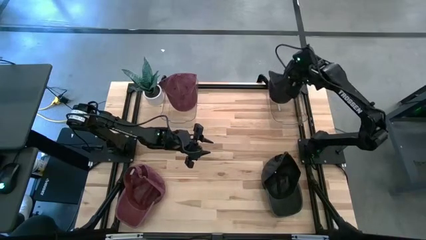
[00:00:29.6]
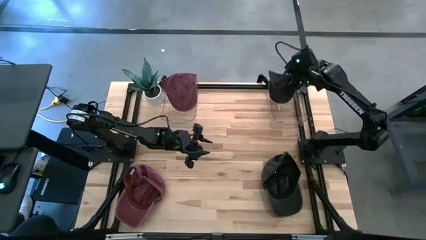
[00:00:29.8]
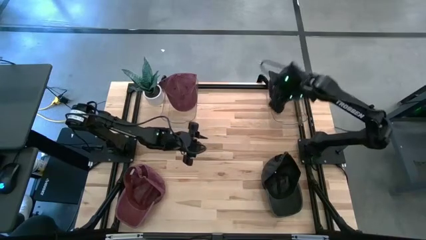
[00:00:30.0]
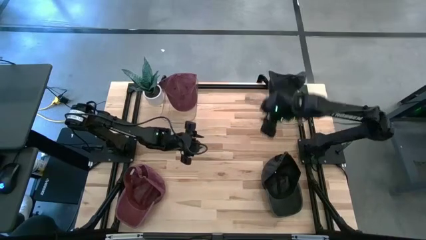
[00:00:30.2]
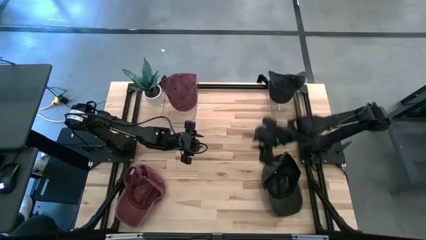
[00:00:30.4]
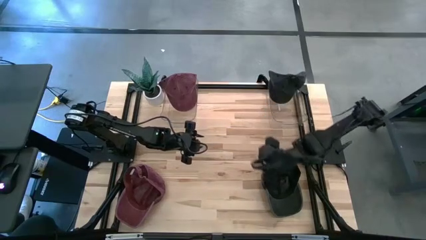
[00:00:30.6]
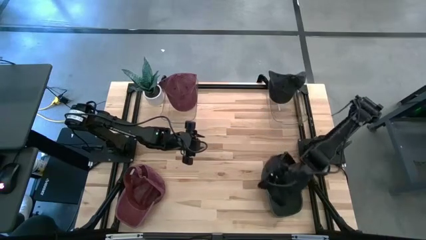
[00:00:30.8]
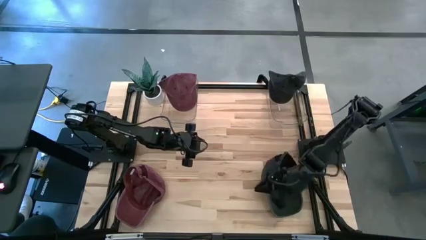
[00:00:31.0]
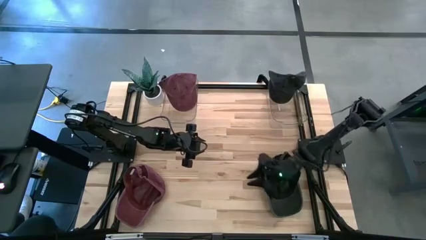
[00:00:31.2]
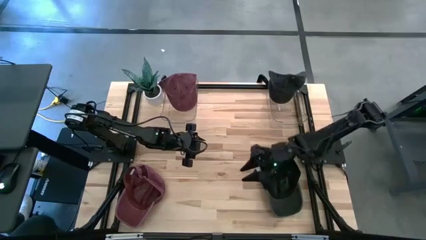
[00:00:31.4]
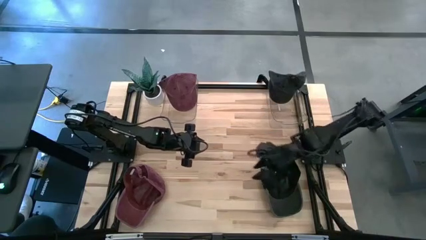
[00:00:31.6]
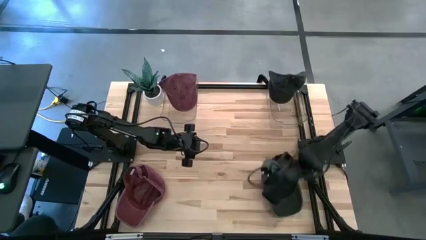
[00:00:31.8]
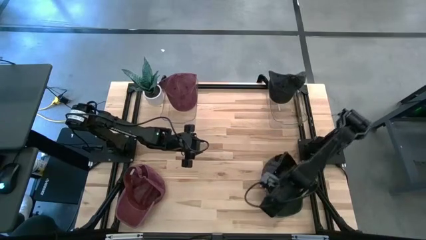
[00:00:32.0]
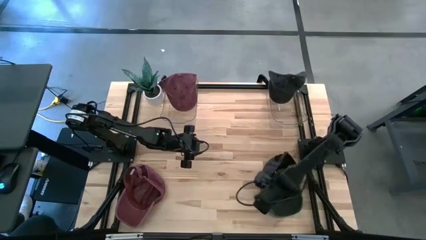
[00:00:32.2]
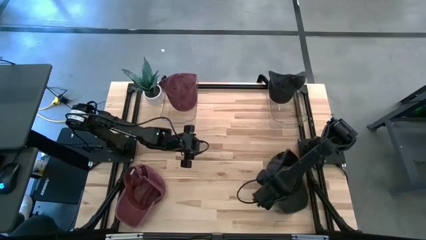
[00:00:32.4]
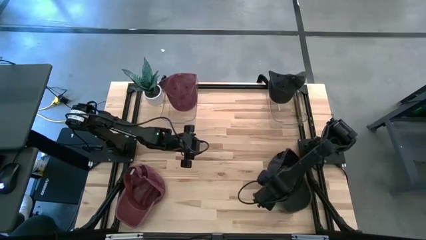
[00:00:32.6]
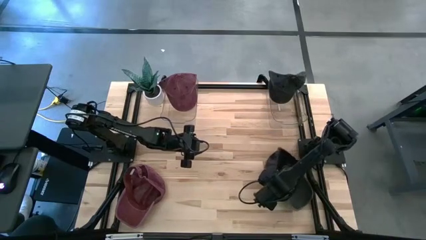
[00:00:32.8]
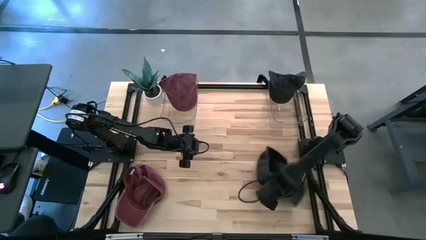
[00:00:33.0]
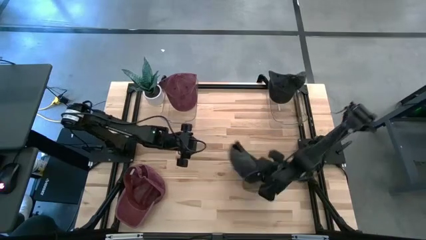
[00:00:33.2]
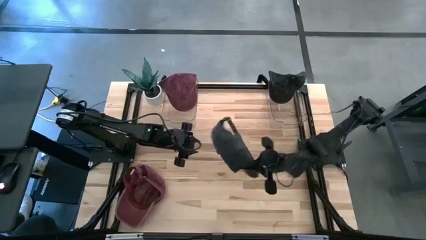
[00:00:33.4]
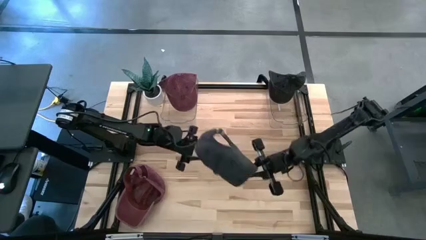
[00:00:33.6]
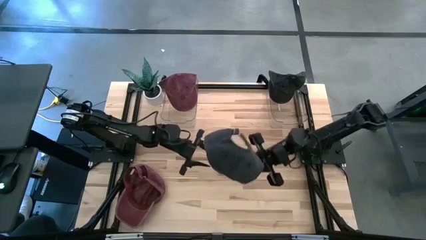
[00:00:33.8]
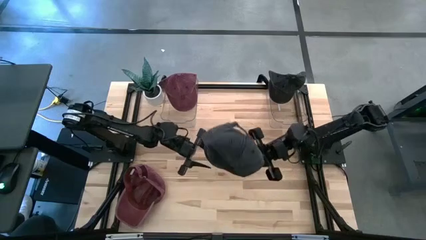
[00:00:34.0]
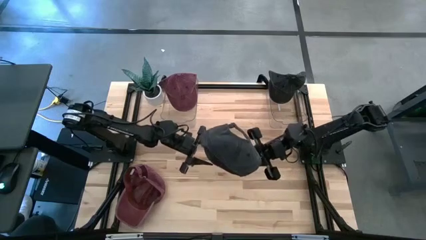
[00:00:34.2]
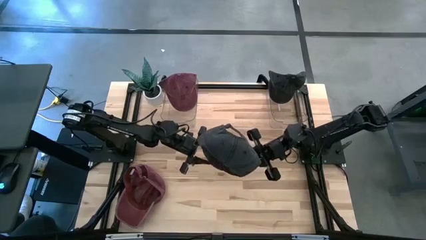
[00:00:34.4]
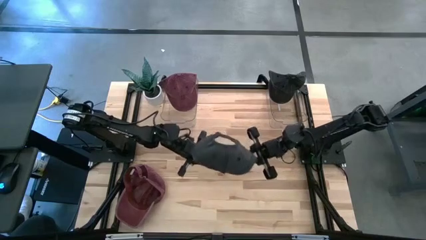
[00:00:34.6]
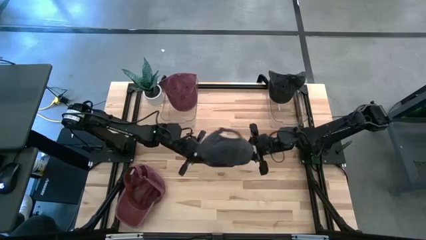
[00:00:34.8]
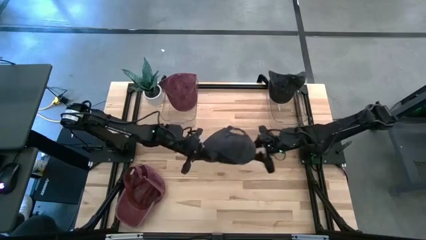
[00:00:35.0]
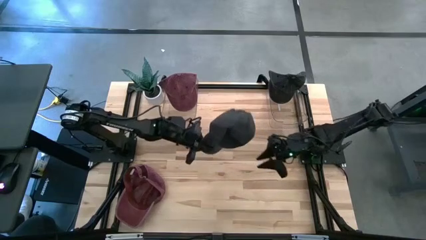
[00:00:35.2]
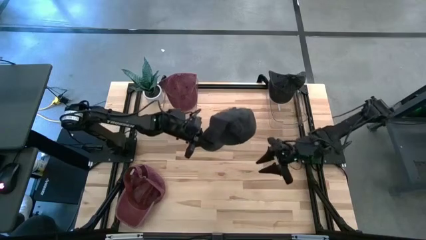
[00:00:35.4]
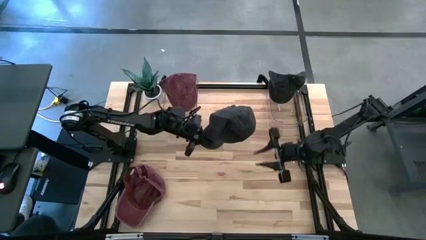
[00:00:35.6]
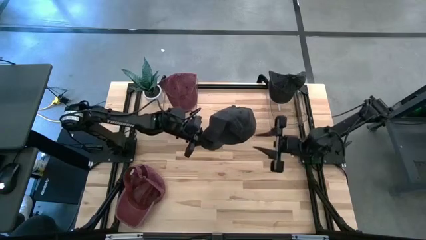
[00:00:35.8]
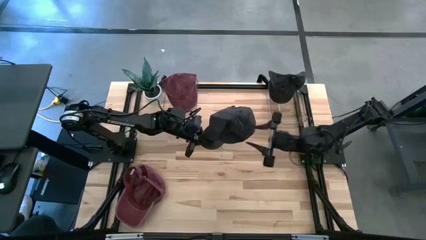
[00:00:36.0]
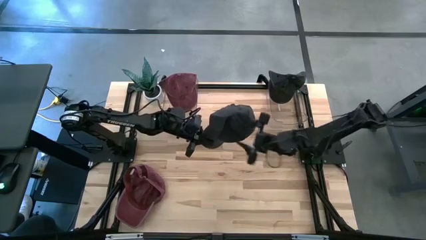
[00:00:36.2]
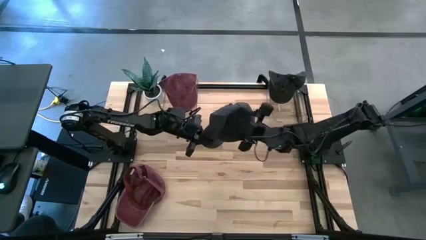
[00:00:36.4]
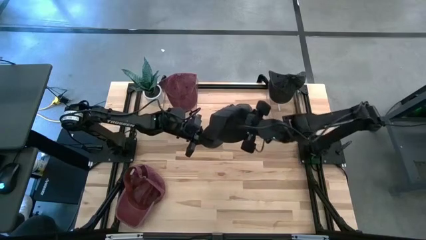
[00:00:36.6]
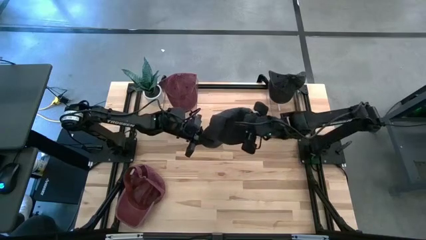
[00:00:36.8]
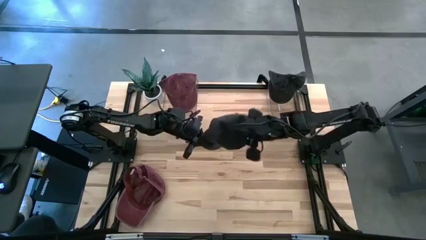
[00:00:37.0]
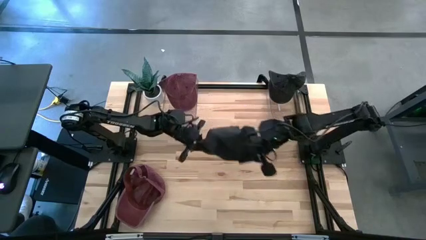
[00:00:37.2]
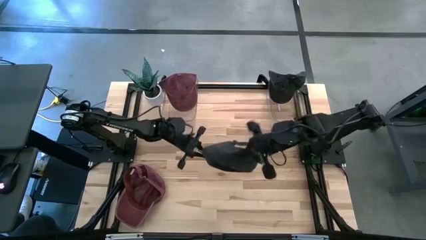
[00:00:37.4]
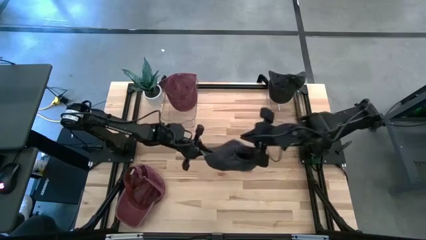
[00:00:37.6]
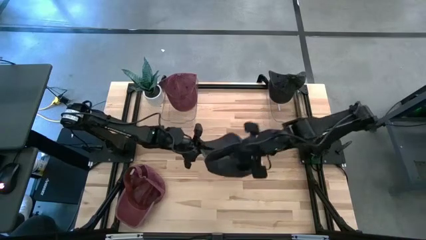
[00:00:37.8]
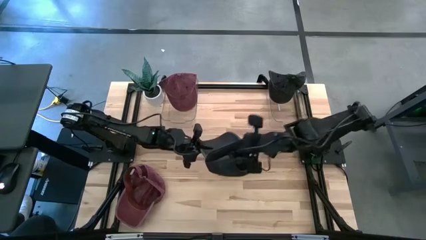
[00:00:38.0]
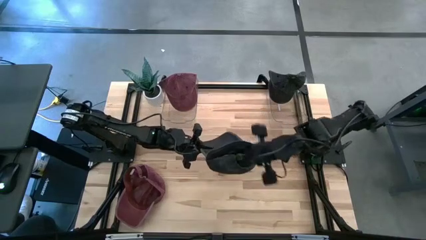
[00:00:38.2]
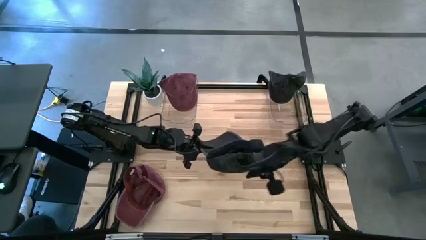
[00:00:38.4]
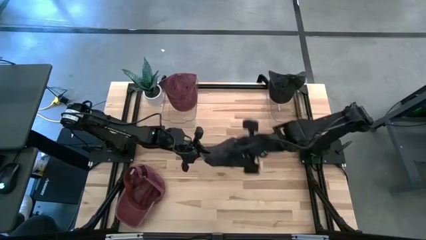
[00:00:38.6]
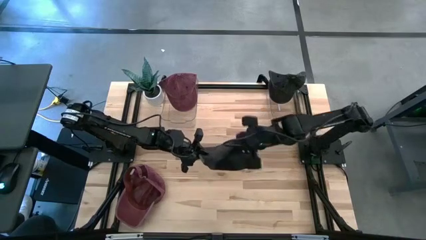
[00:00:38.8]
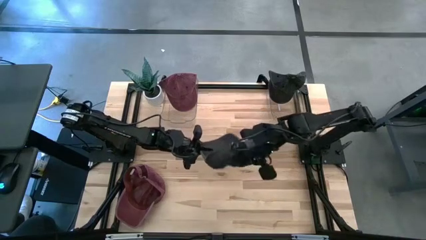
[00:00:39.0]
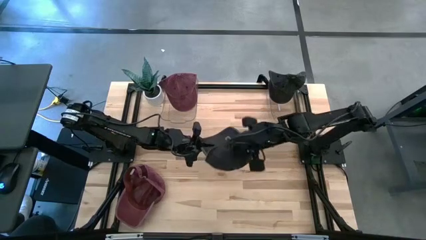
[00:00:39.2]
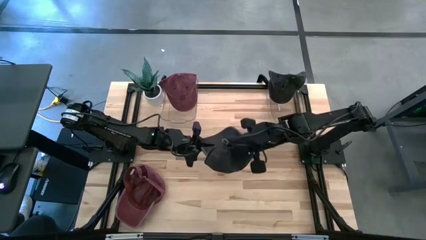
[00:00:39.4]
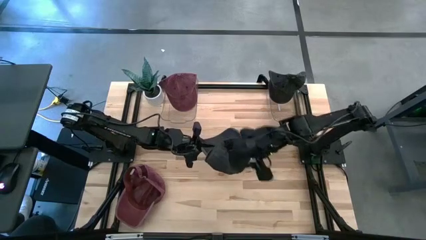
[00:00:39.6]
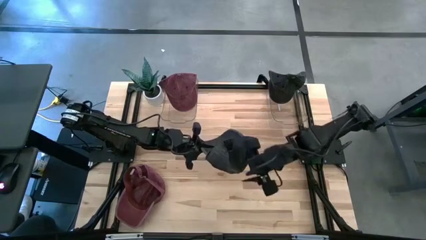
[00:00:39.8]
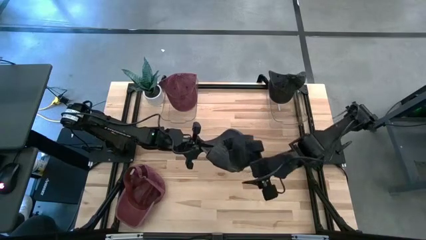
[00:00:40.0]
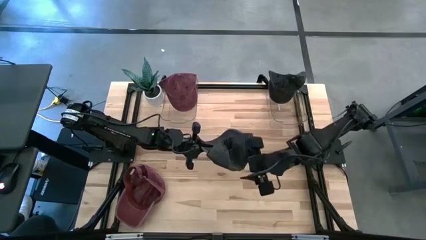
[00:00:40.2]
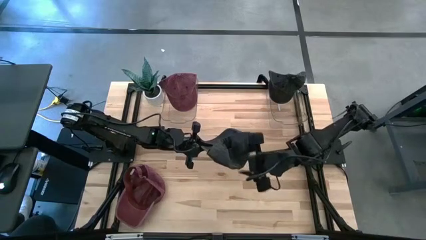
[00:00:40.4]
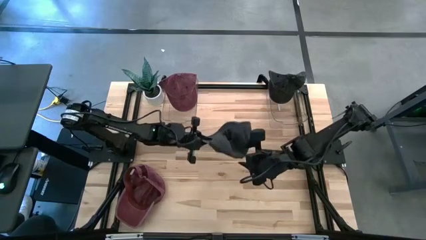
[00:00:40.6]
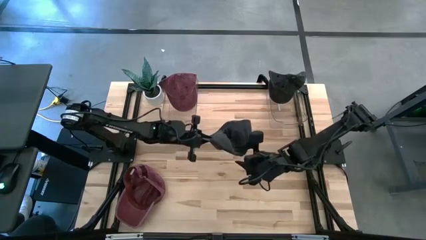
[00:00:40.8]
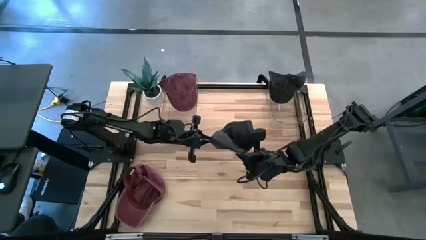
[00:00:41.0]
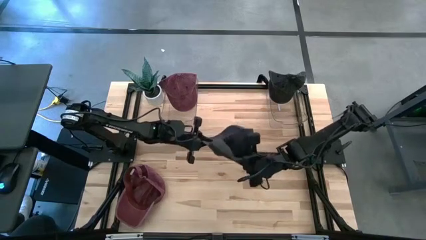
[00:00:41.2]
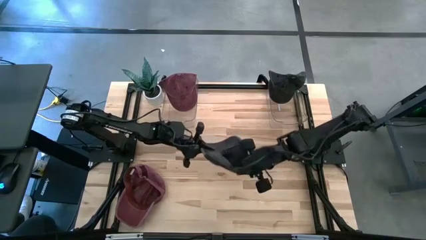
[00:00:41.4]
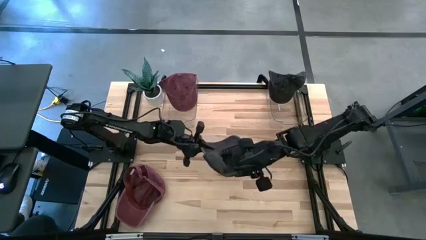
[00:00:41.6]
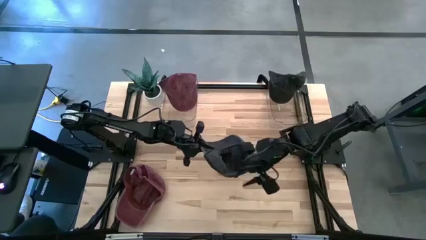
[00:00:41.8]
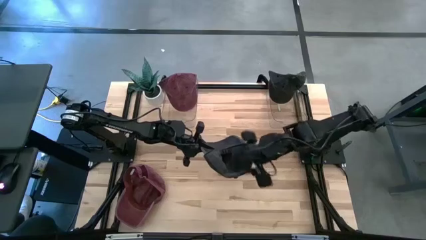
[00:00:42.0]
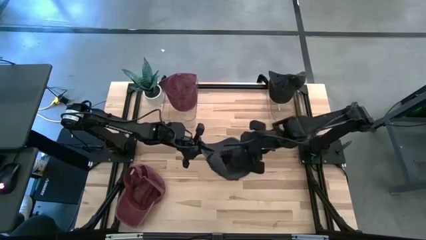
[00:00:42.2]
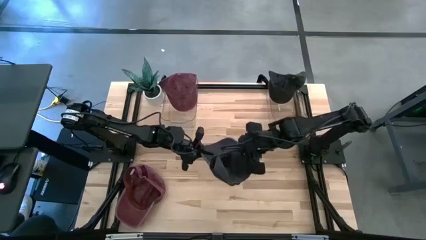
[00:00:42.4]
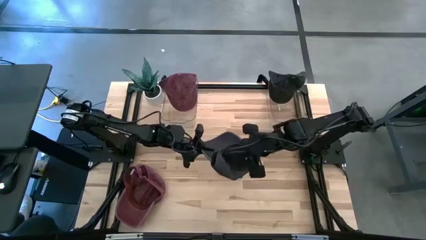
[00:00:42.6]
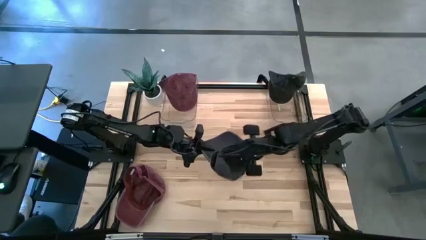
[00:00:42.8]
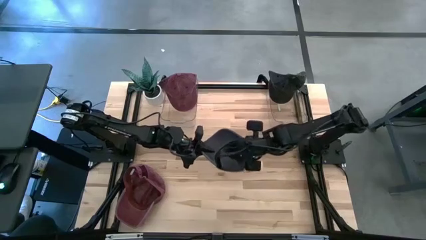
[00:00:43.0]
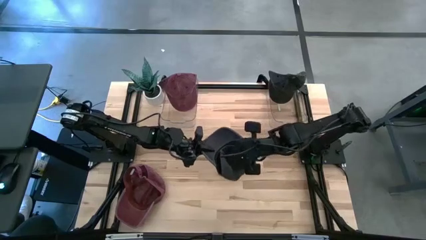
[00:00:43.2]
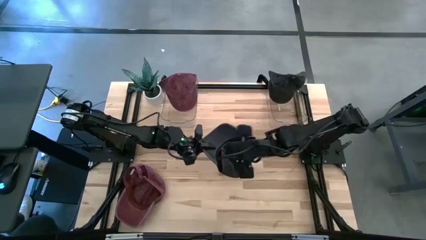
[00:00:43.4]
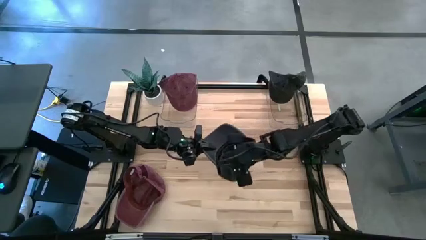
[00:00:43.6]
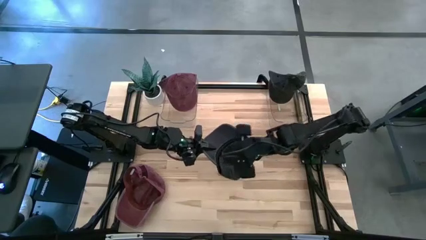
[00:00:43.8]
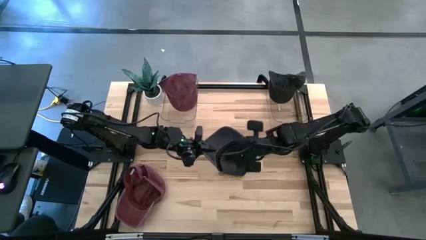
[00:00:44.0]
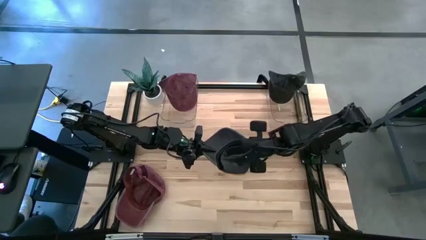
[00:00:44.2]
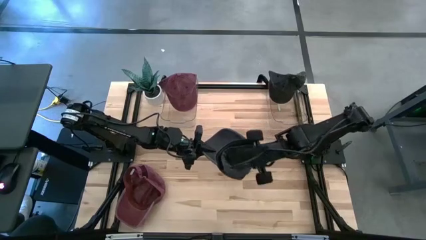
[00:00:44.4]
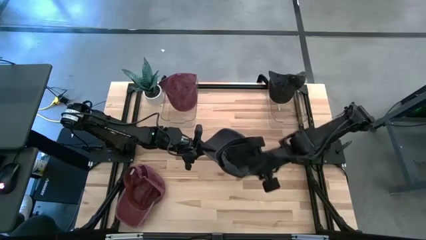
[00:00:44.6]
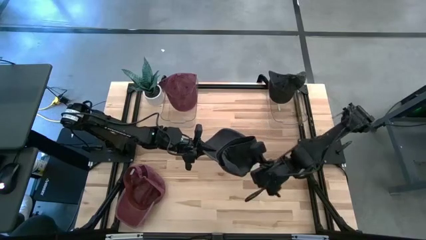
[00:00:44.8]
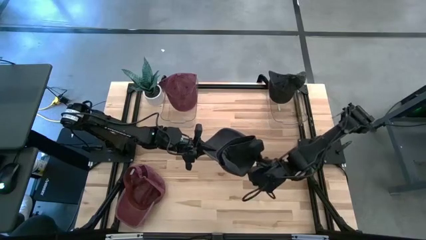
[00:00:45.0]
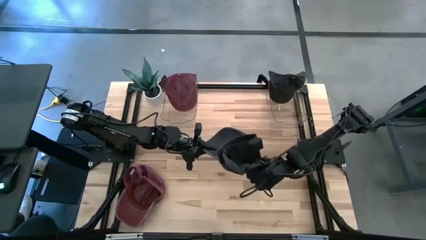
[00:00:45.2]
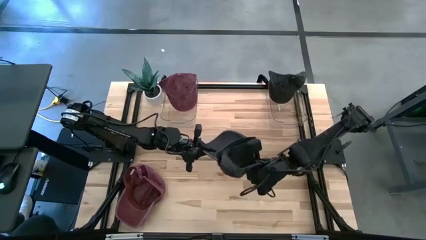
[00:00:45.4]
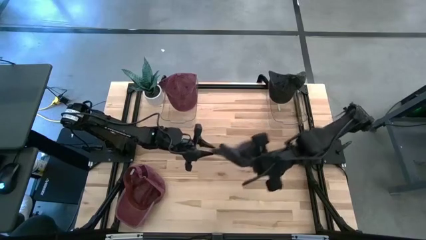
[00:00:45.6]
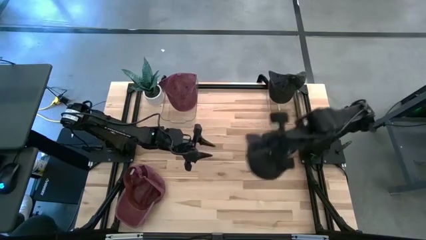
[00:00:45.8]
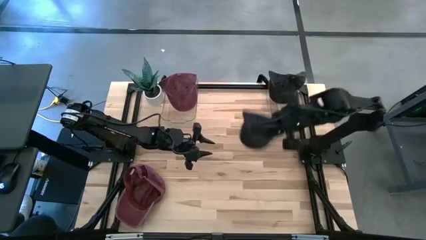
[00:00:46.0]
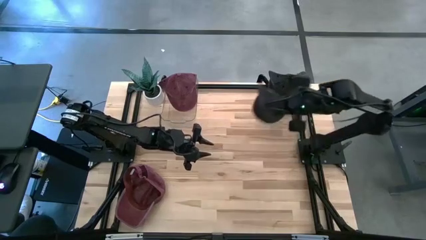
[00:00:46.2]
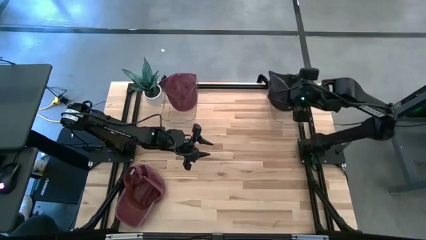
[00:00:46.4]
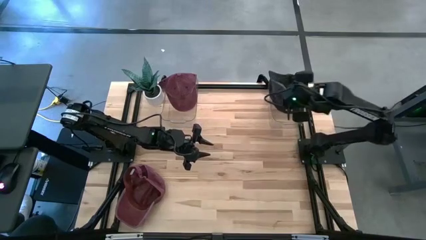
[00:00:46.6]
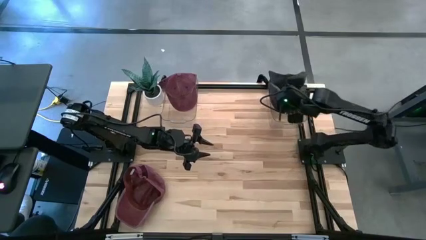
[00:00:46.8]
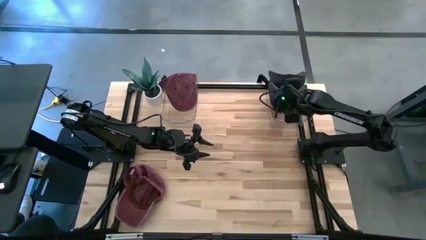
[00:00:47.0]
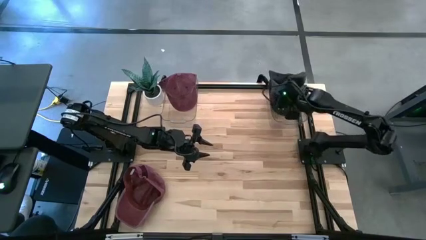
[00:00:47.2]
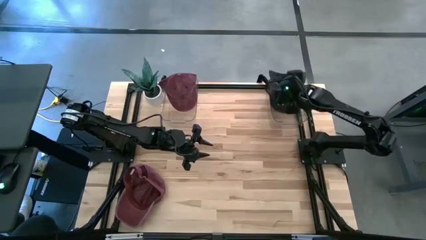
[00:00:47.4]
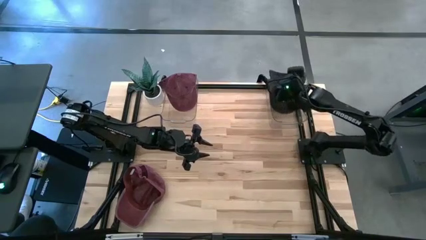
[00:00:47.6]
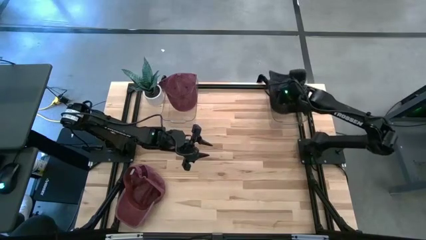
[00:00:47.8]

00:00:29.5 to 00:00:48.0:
Task: Pick & Place hat
Put the black cap into the right transparent bin
